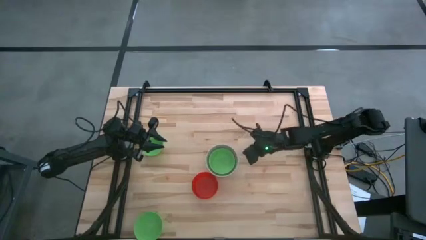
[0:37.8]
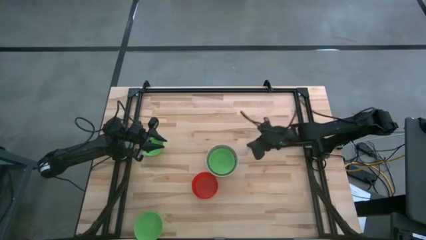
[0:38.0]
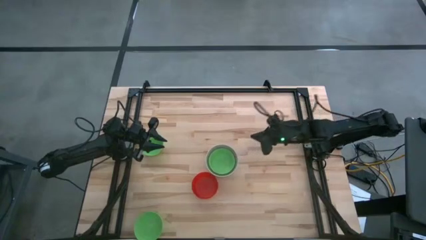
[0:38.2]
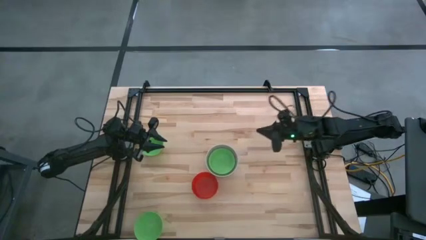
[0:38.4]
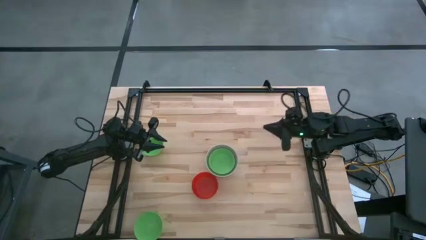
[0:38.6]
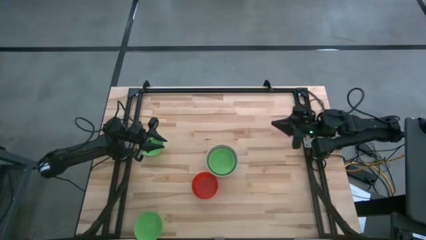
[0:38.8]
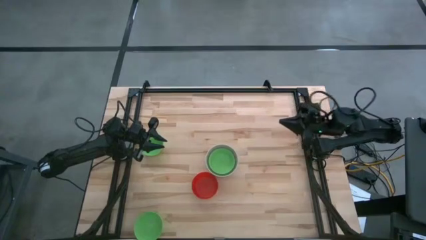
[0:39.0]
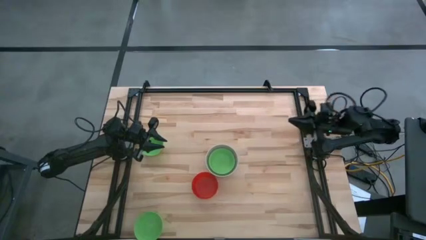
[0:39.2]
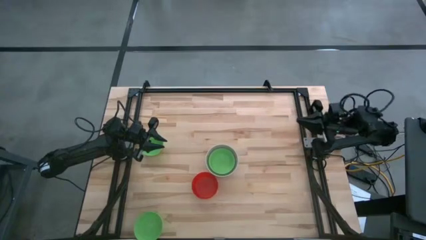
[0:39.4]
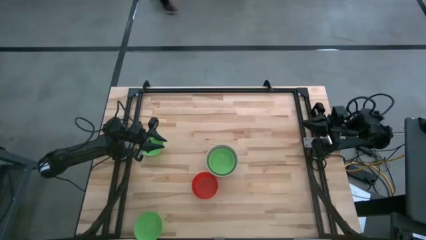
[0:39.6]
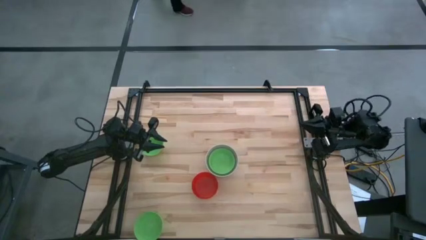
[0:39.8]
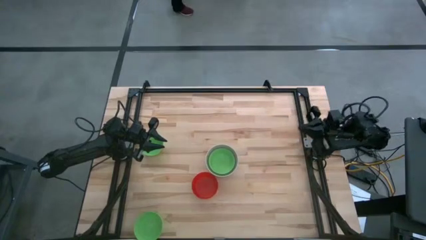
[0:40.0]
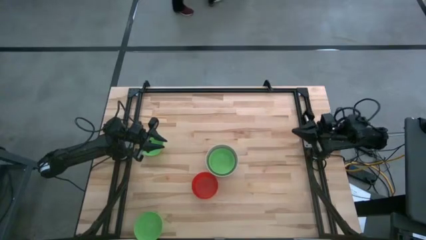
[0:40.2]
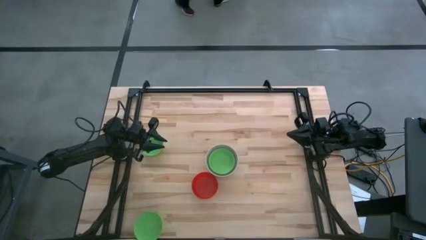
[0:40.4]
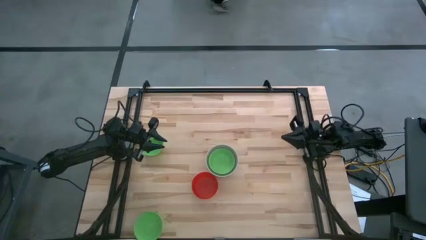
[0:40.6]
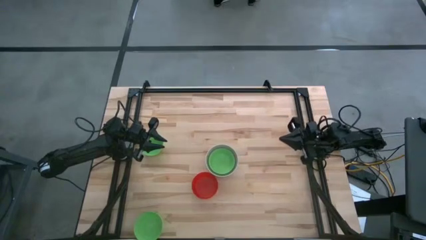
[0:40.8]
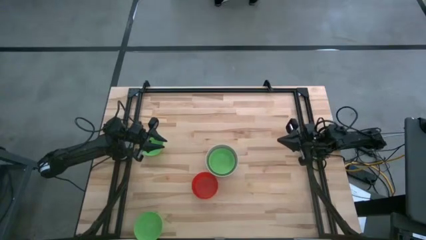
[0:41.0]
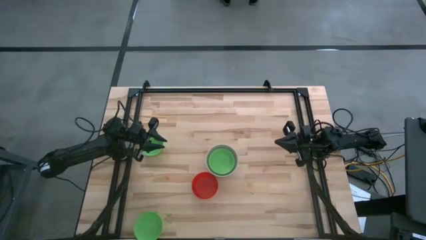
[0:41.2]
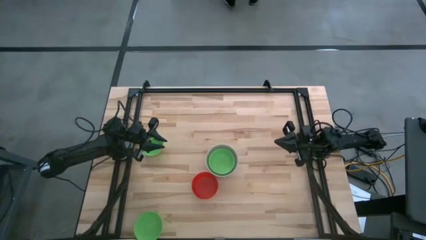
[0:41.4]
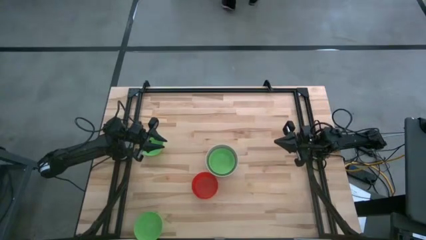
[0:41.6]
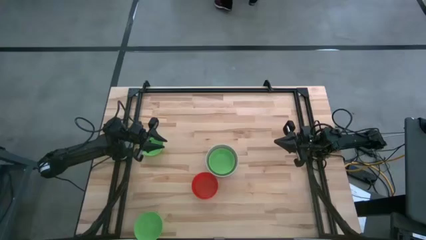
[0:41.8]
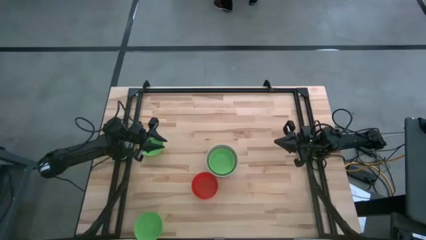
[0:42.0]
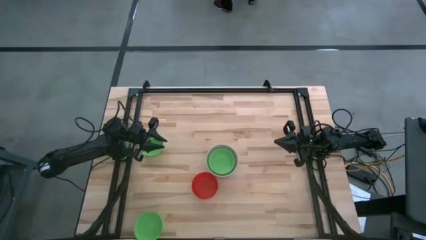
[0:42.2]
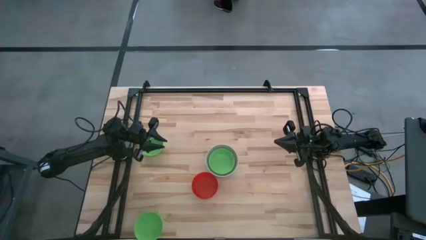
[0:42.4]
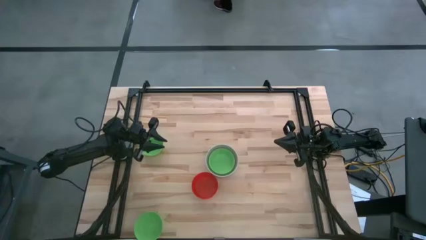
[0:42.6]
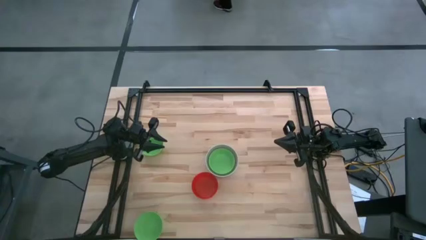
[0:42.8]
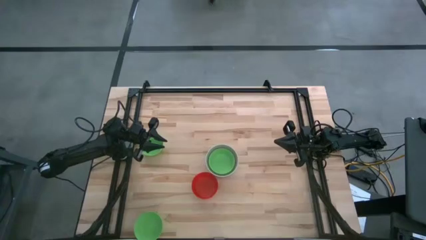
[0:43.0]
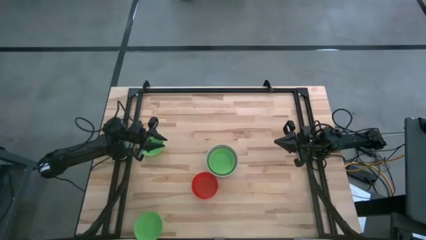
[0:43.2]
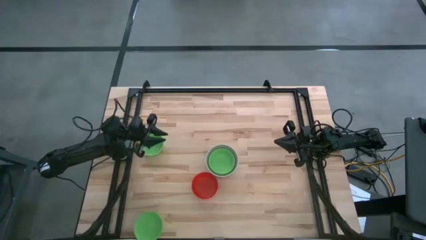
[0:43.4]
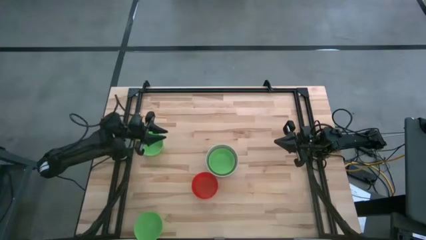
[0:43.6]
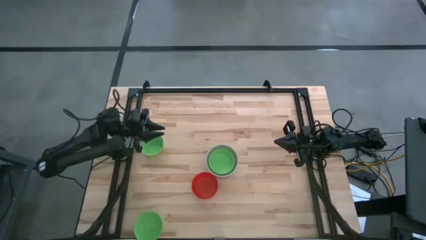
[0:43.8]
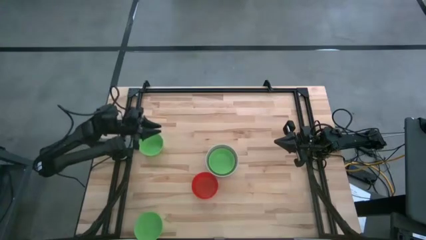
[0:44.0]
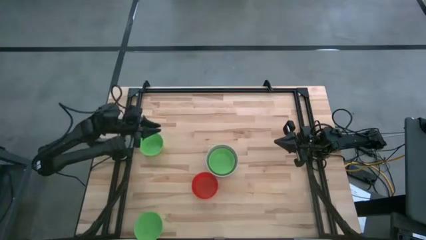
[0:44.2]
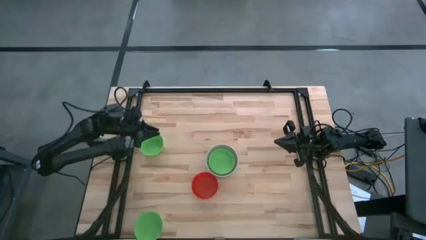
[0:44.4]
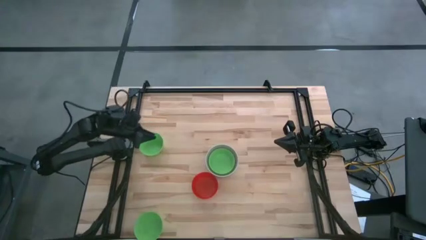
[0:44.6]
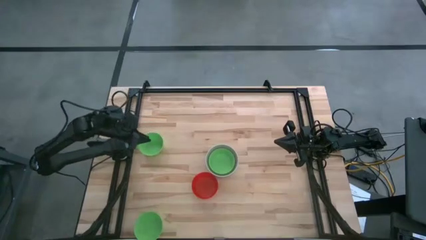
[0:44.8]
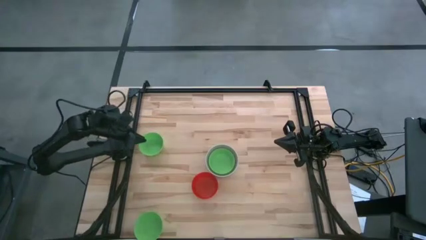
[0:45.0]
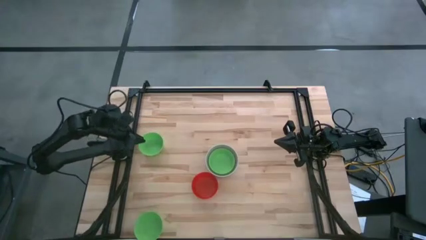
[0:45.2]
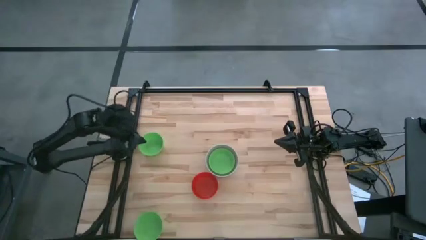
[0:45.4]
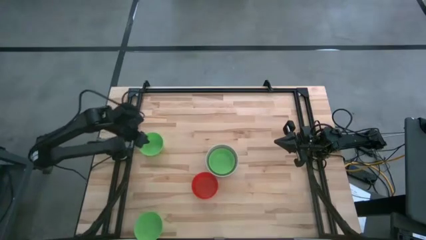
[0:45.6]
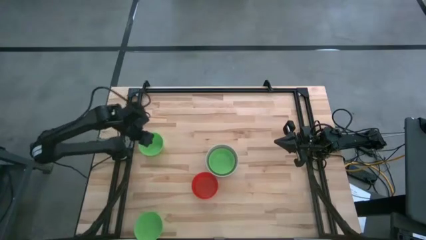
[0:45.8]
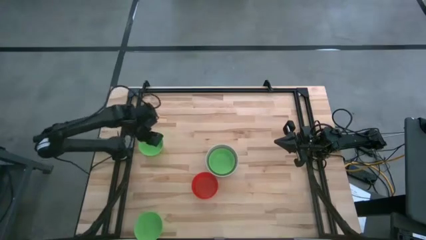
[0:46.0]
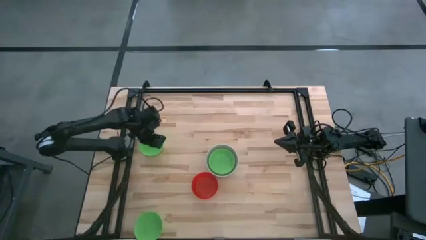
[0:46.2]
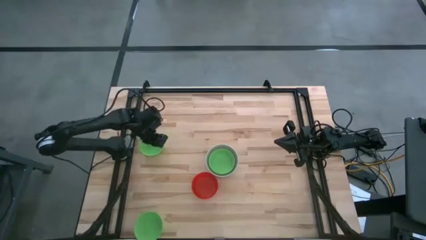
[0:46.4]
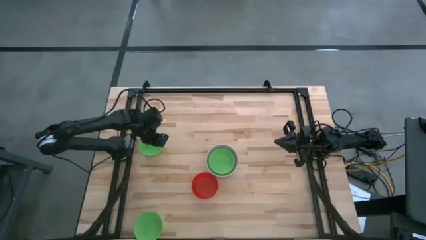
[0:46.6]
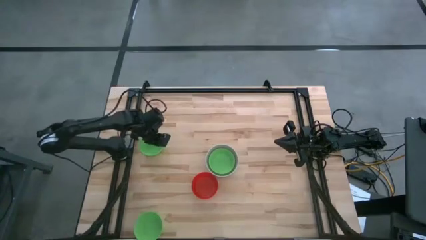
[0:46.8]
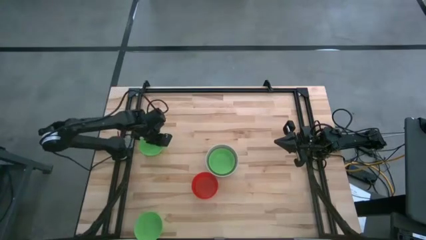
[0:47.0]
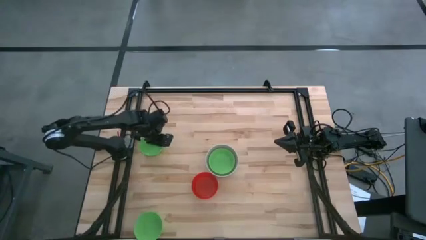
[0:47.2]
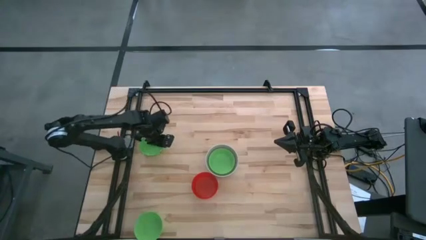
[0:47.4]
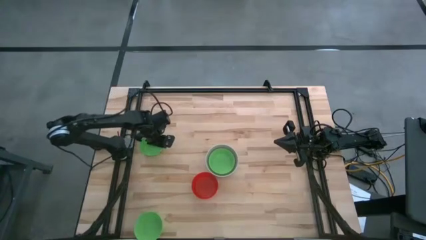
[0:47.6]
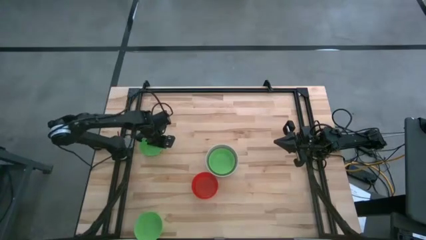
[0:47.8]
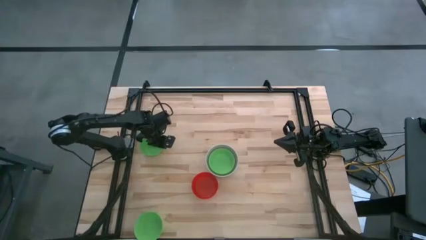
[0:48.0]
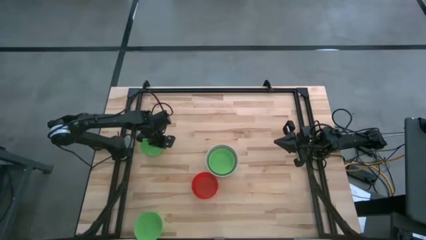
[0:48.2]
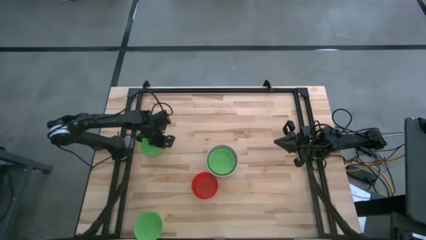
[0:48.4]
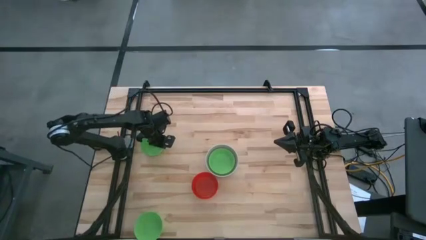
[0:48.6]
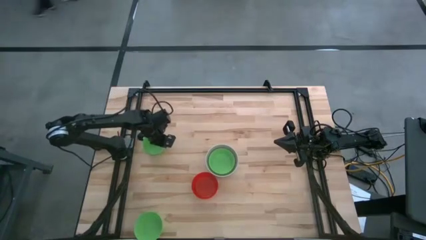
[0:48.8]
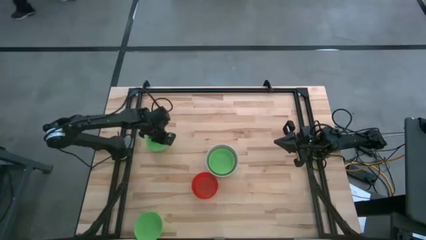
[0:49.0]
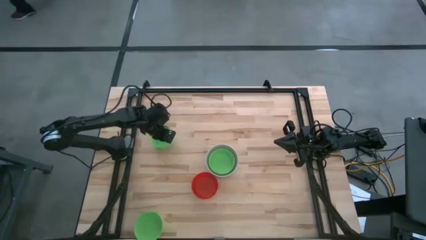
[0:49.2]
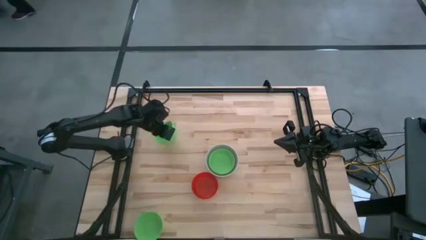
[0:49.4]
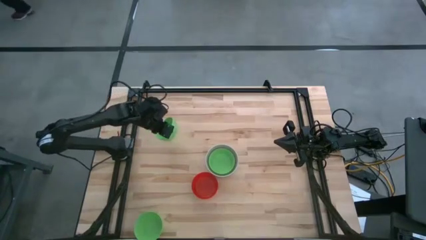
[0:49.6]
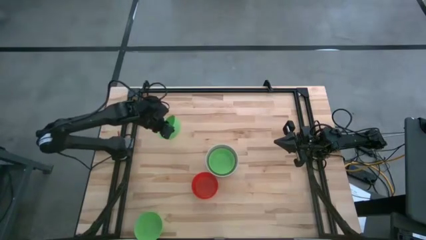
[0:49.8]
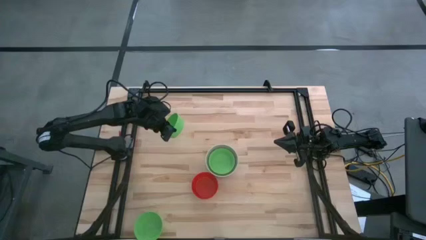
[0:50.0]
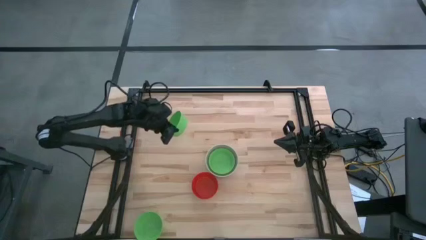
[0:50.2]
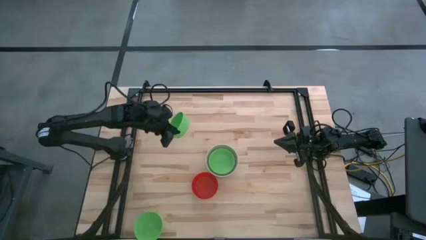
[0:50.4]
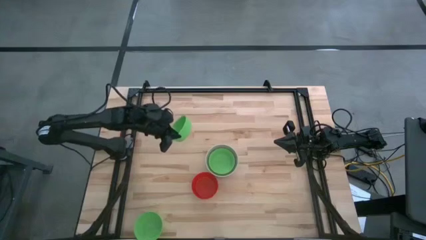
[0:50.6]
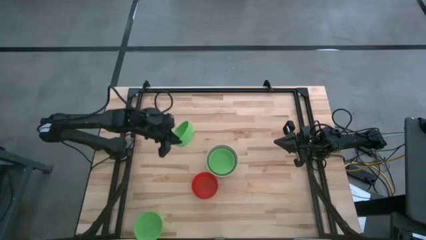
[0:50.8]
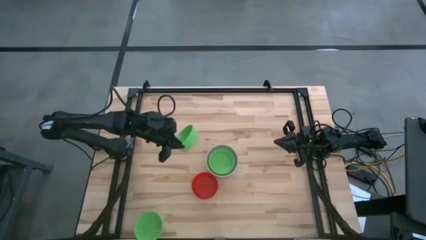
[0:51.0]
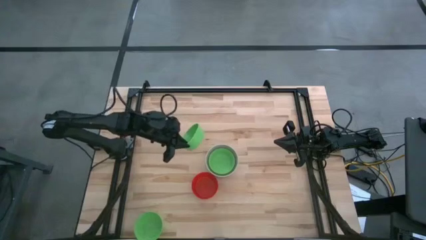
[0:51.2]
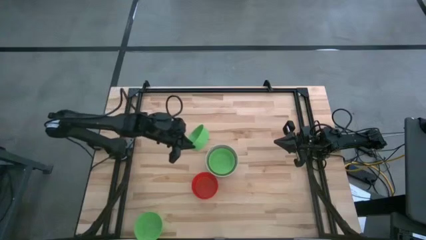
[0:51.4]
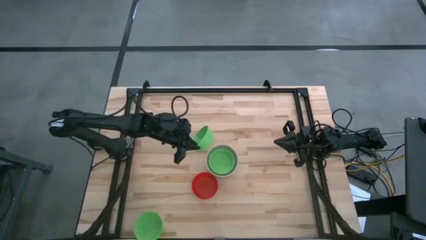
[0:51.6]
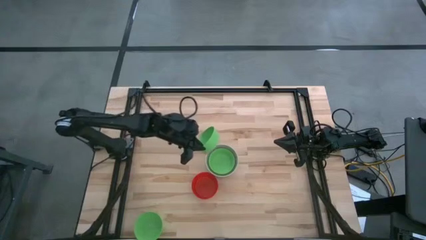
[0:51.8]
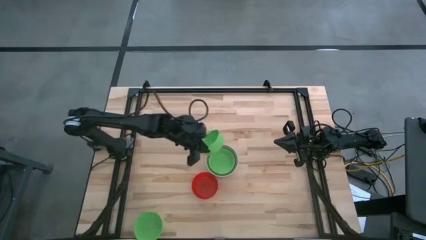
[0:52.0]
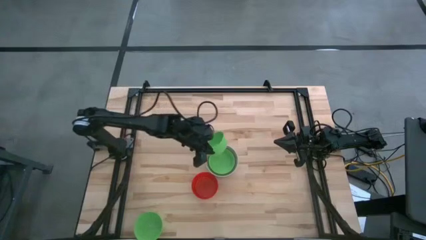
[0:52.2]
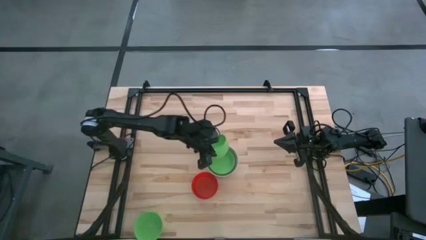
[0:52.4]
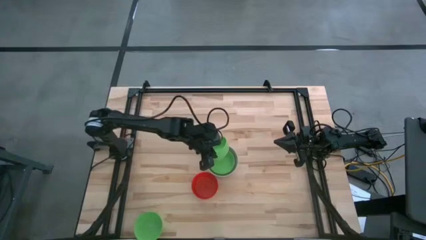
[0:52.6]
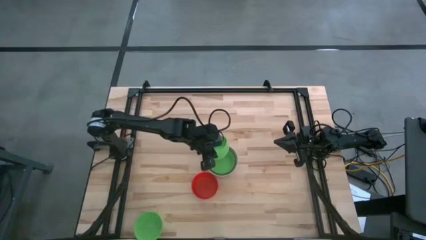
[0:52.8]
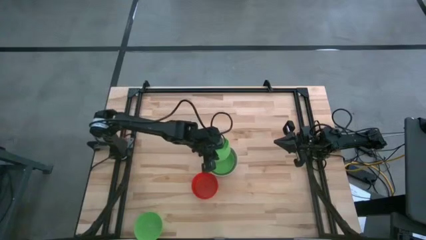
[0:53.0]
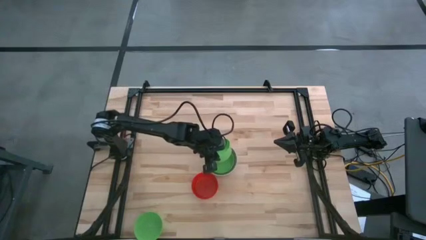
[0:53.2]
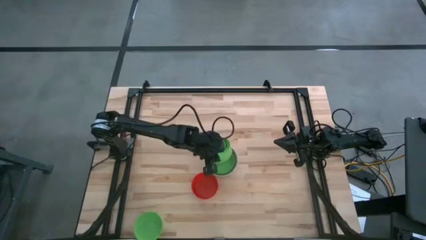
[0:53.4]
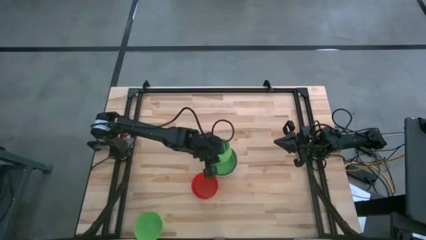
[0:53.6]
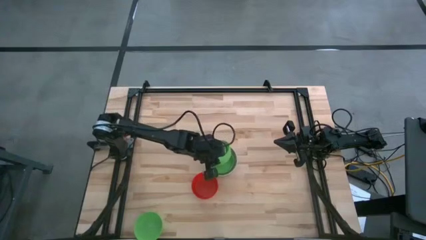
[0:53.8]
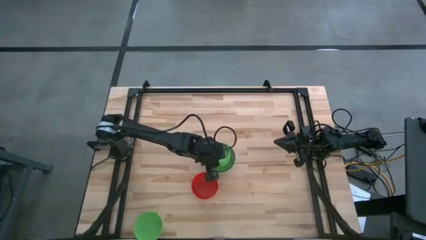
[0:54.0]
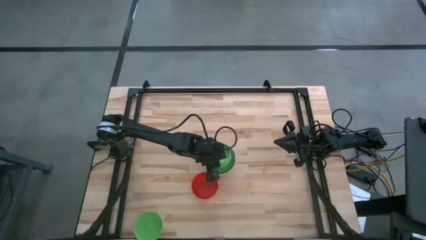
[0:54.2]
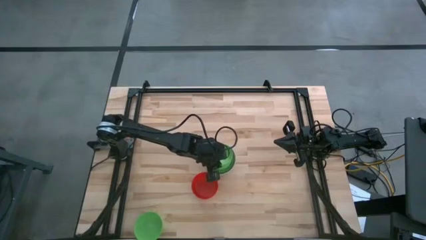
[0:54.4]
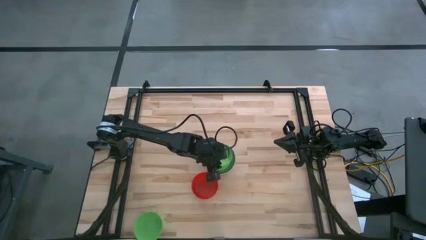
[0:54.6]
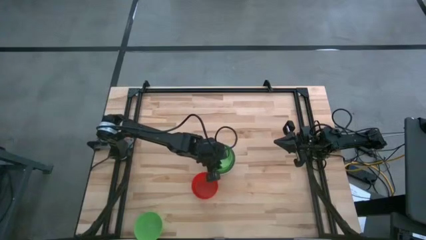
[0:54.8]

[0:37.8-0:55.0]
Stack the top green bowl on the right green bowl
